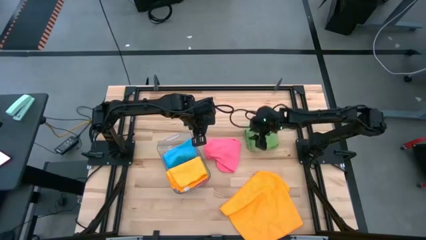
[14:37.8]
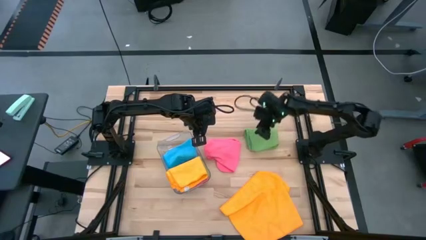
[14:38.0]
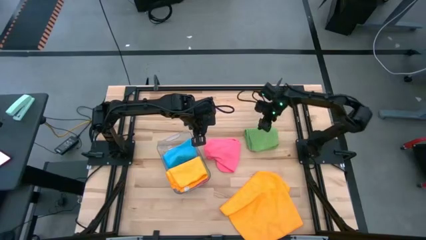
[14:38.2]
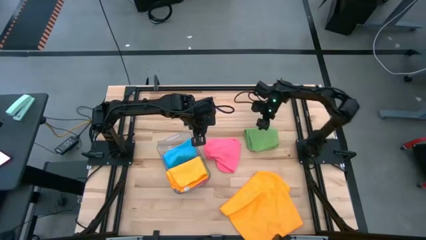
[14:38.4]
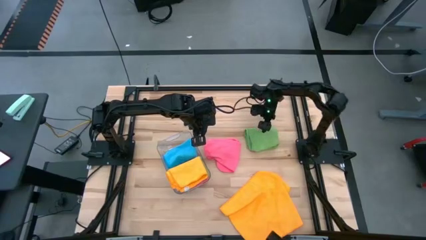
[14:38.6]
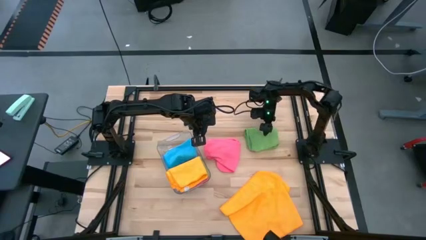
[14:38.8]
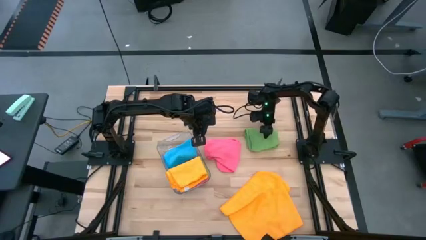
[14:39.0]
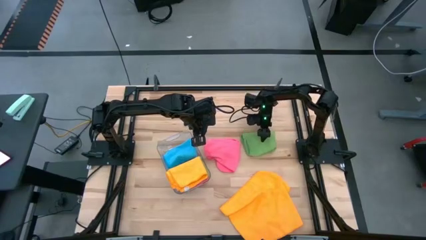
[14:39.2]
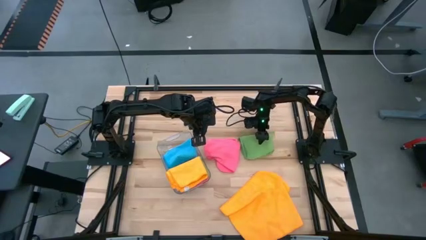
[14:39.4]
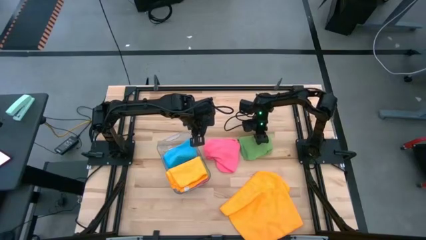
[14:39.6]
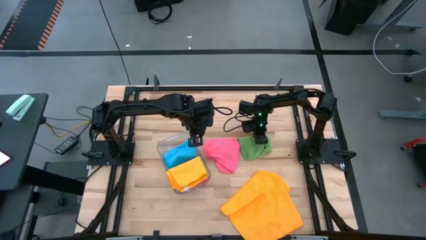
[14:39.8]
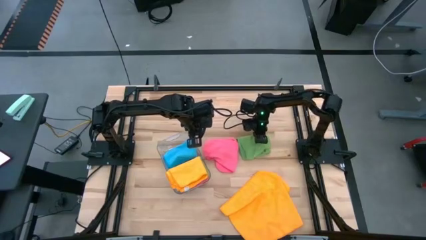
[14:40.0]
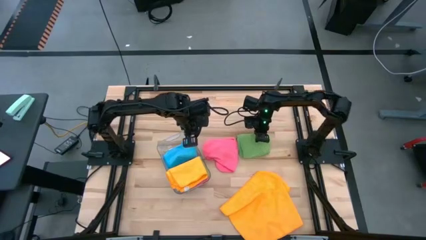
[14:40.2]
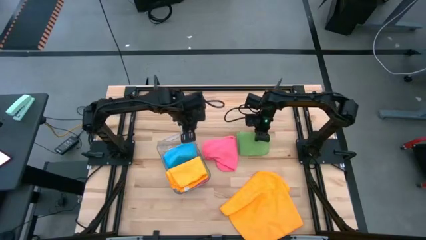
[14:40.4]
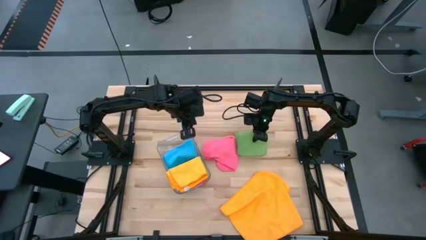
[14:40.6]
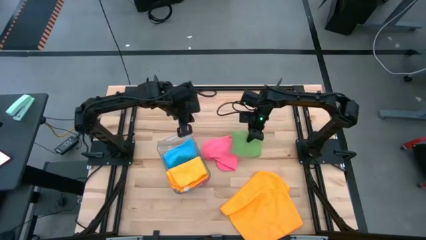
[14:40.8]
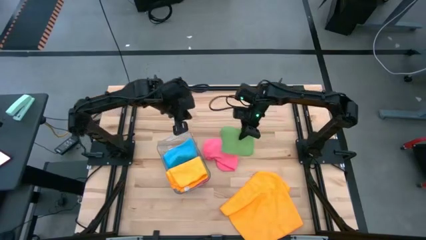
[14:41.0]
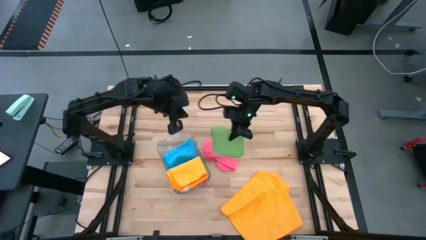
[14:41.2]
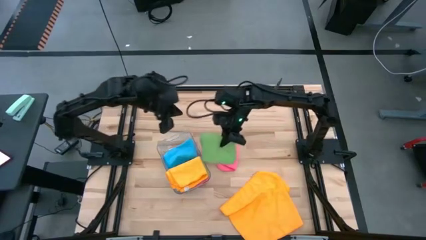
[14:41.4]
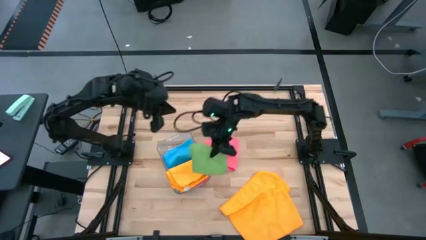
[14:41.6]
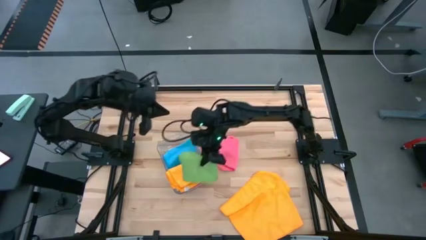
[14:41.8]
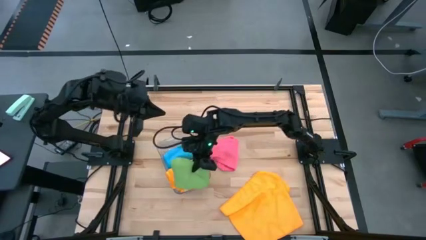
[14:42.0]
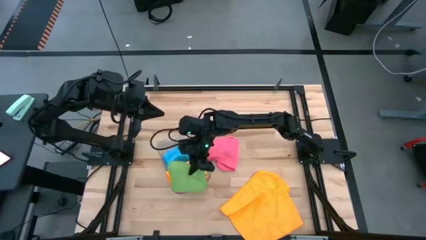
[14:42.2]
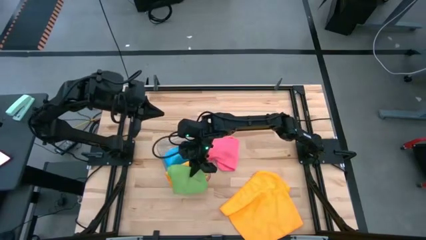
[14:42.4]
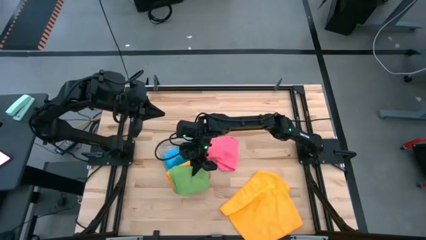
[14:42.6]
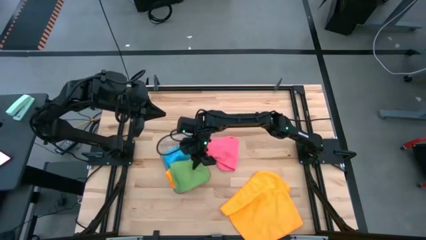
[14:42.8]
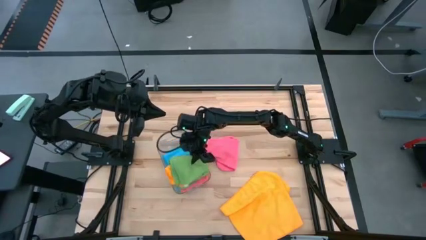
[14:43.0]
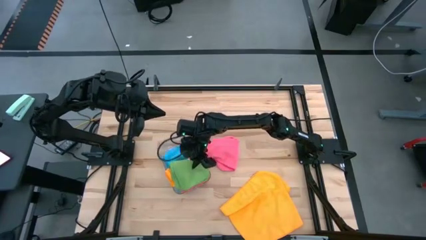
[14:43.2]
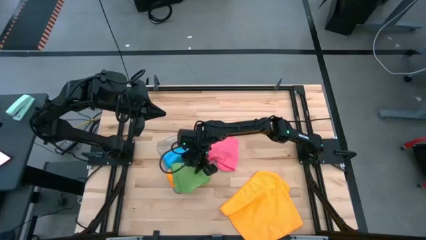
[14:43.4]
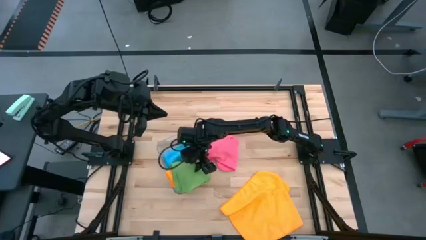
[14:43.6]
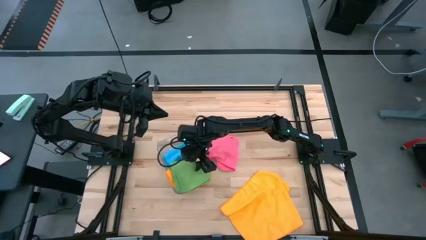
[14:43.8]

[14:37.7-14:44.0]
Task: Fold microfiber towels
Put the green towel into the transparent bin
